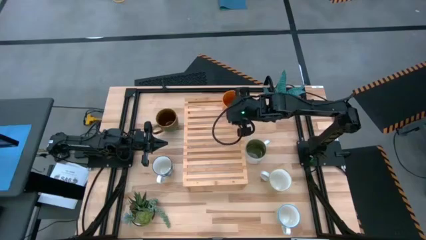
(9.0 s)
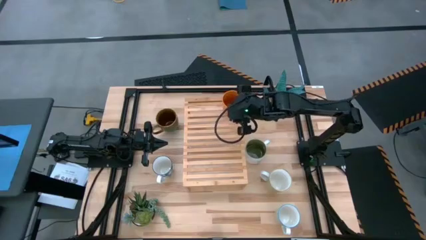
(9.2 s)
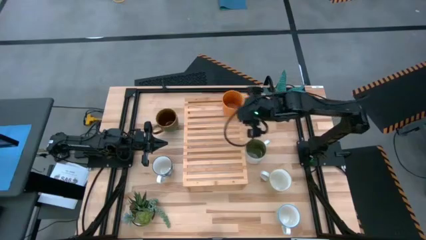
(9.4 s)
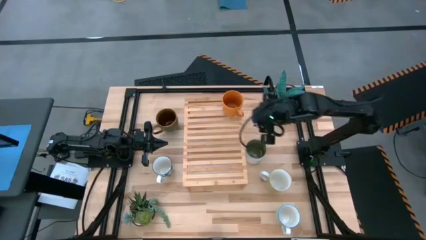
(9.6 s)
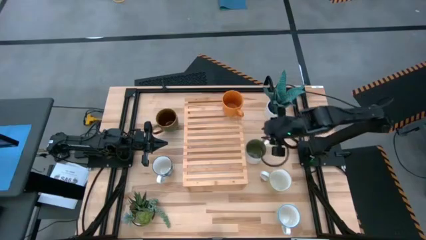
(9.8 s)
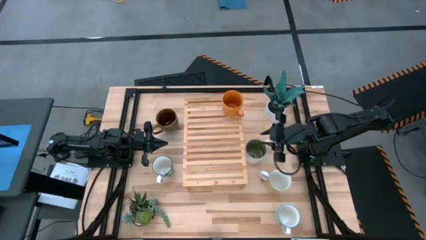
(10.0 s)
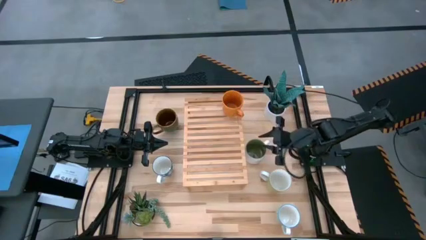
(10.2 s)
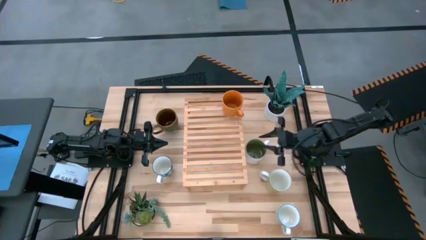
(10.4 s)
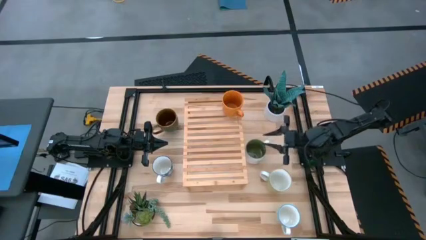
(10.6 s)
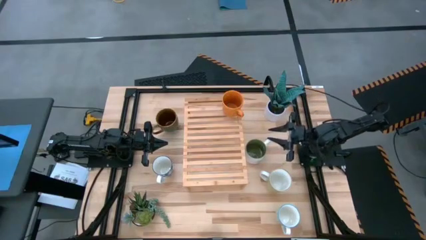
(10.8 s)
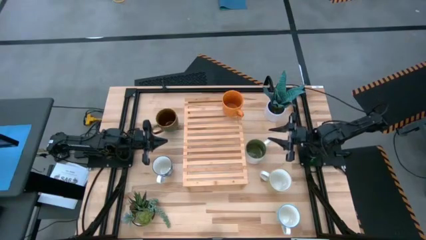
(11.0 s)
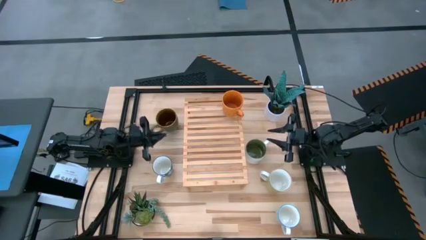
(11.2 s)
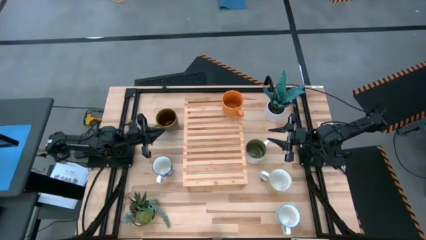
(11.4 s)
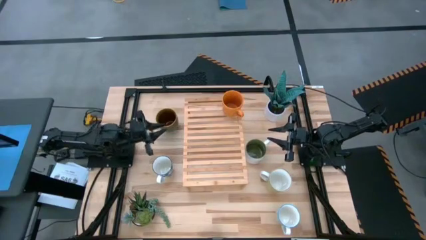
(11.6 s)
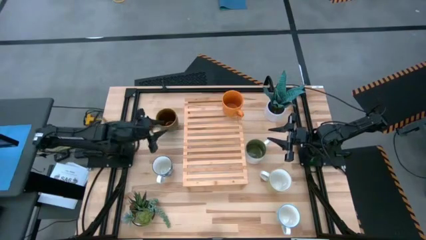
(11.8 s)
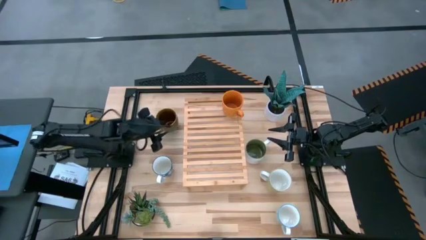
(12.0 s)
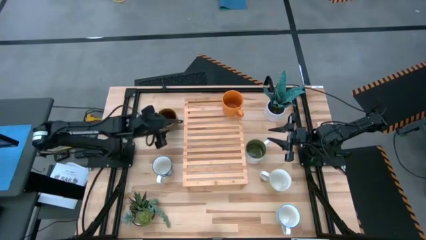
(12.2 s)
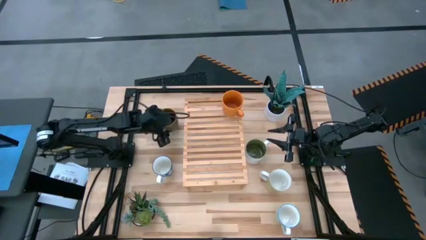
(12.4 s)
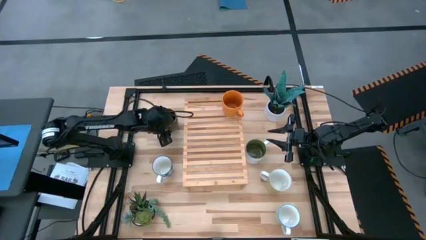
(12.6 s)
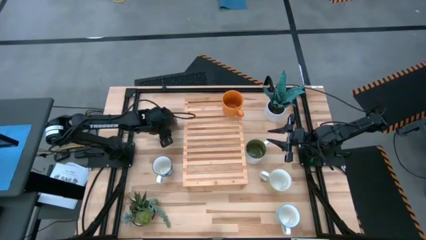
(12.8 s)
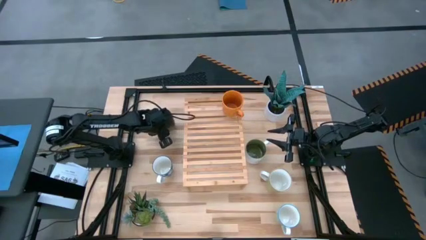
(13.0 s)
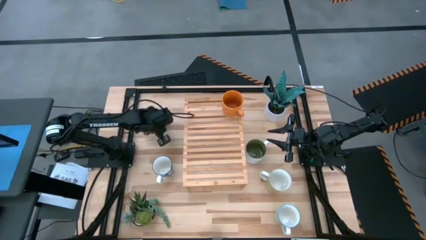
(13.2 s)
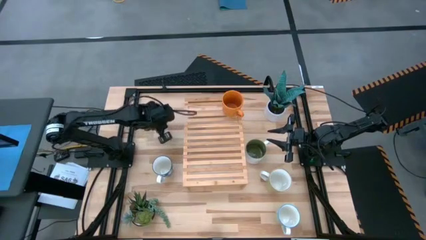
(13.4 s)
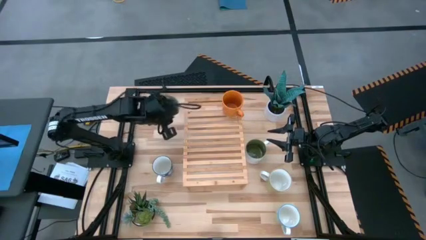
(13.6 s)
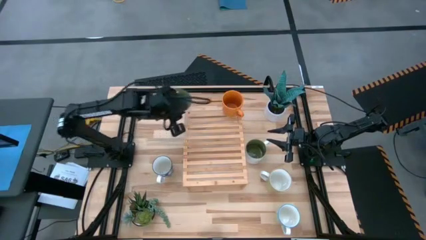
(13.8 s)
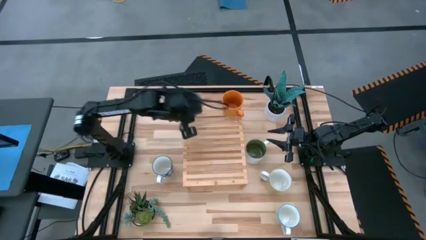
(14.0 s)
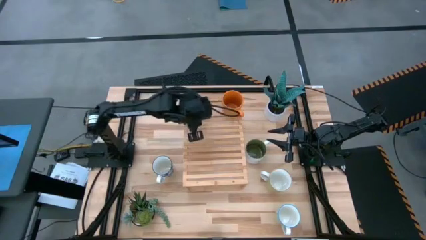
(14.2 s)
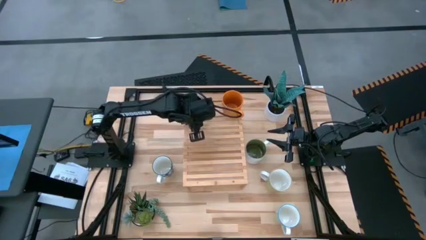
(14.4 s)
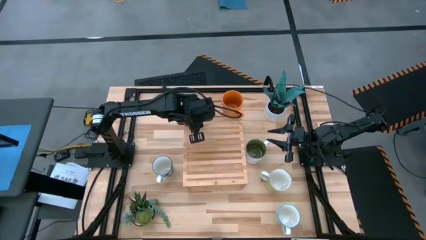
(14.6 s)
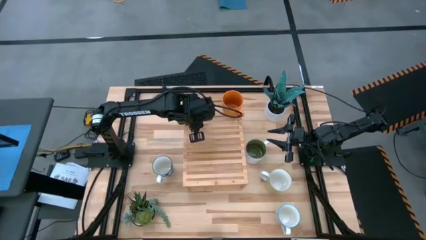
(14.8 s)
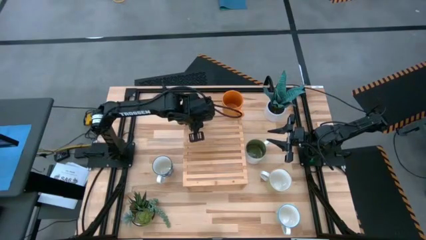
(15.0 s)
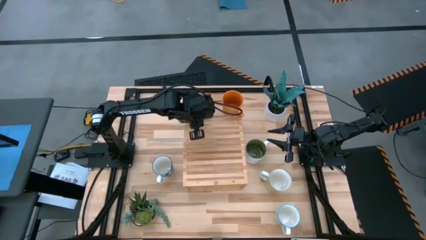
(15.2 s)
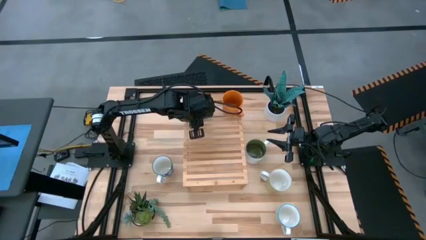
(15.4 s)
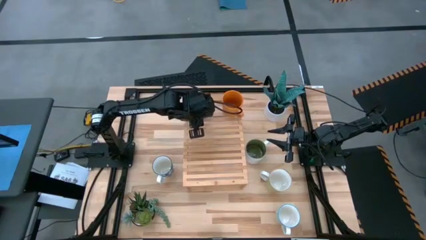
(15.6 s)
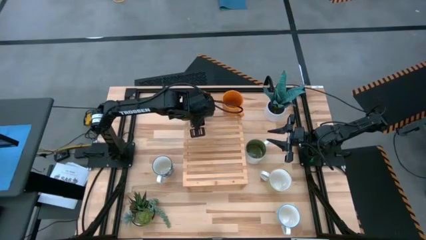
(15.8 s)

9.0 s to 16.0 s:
Task: Place coffee mugs
Put the dark green patterned mug on the shelf

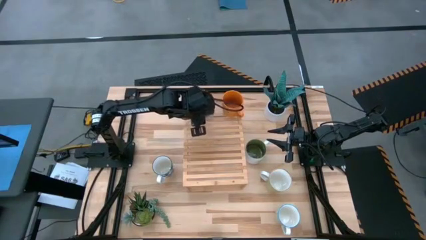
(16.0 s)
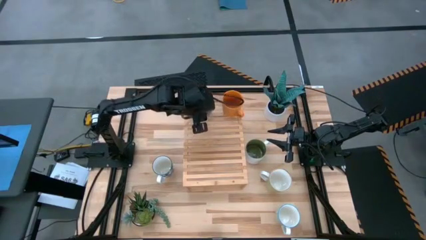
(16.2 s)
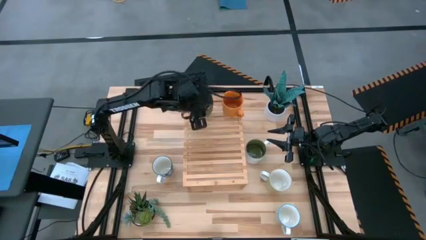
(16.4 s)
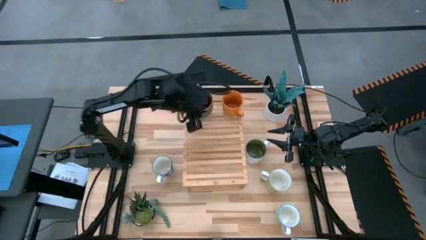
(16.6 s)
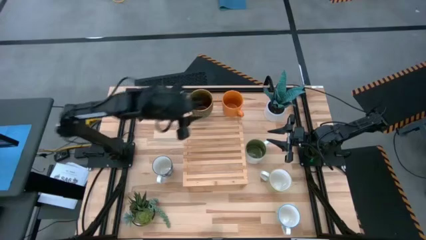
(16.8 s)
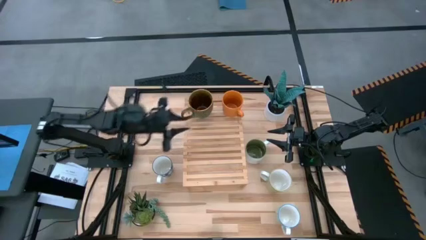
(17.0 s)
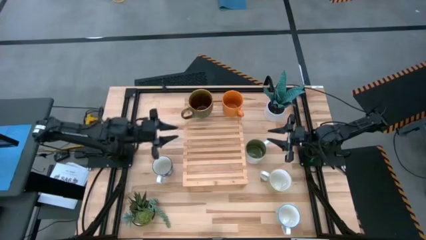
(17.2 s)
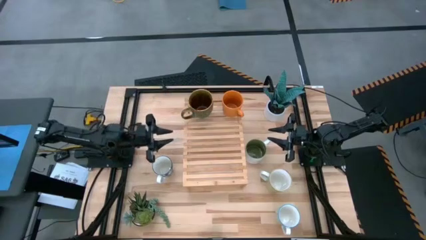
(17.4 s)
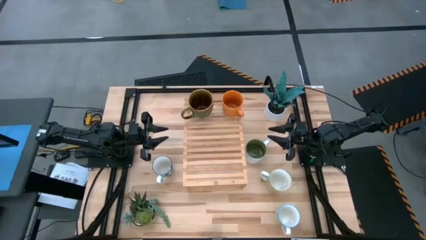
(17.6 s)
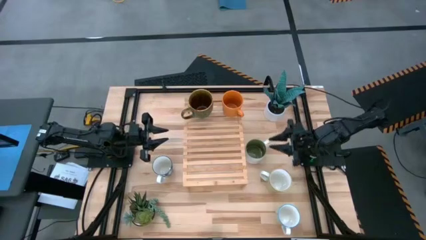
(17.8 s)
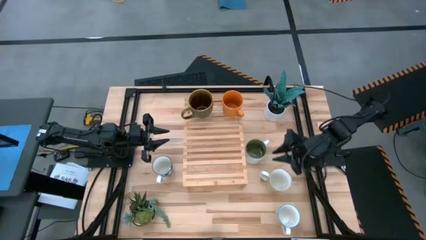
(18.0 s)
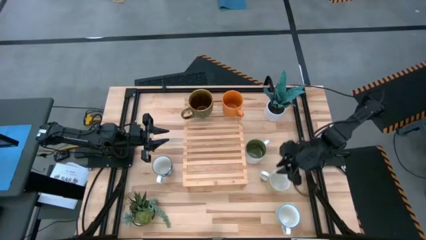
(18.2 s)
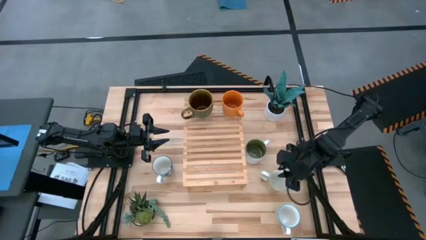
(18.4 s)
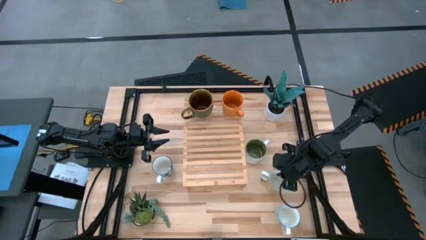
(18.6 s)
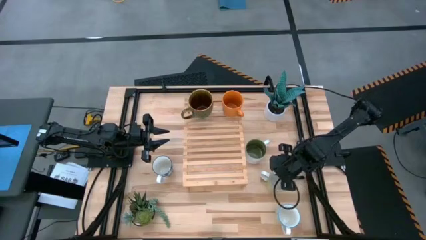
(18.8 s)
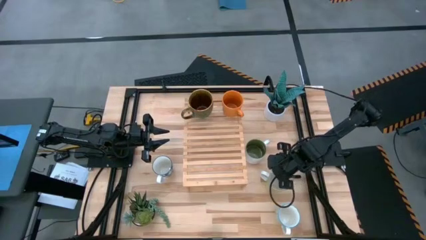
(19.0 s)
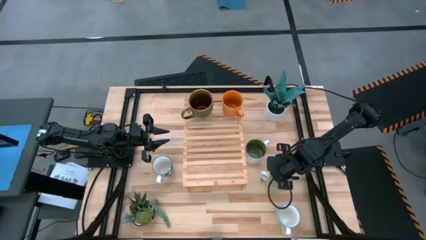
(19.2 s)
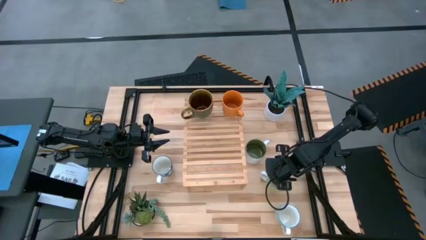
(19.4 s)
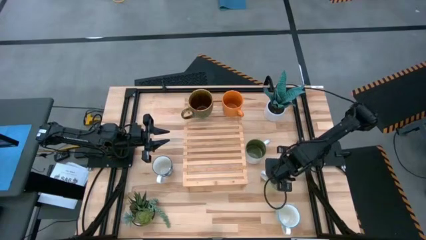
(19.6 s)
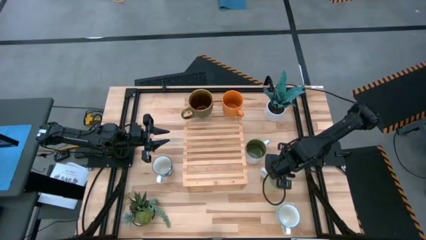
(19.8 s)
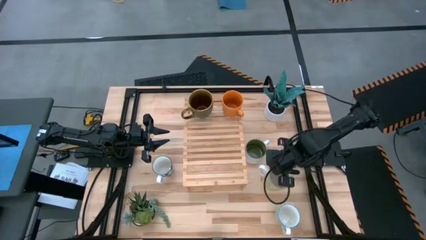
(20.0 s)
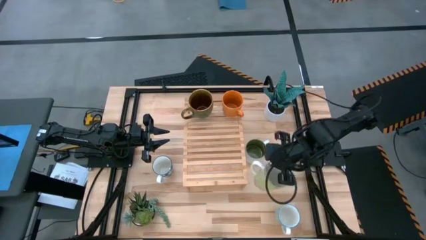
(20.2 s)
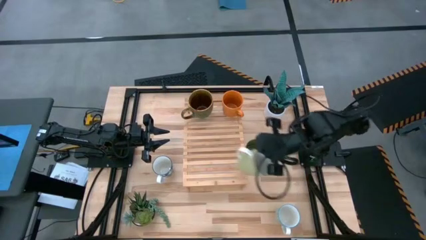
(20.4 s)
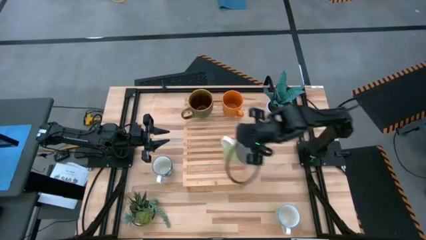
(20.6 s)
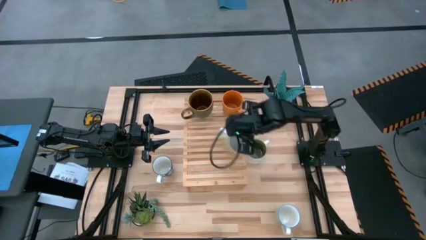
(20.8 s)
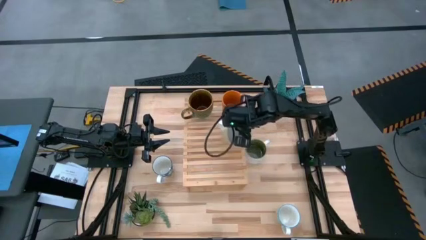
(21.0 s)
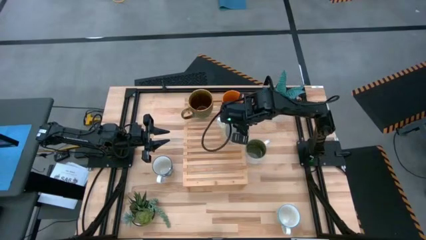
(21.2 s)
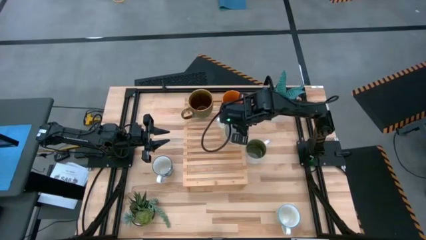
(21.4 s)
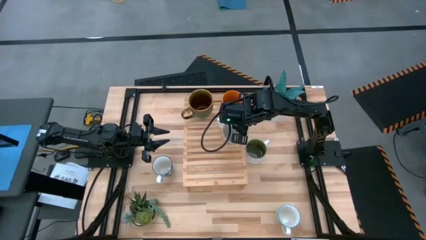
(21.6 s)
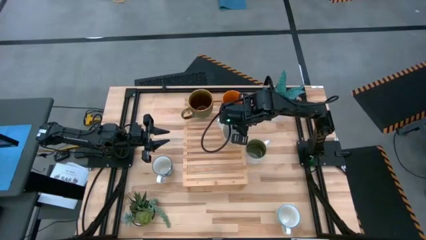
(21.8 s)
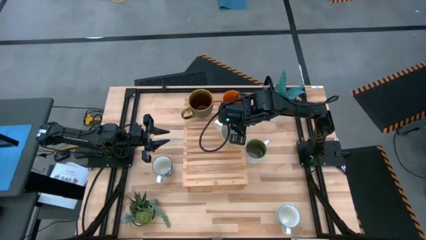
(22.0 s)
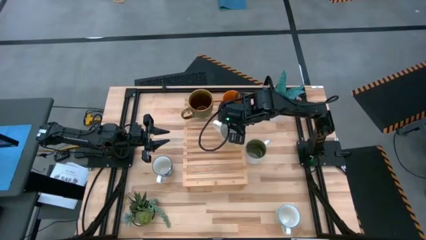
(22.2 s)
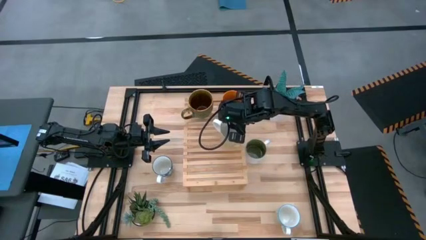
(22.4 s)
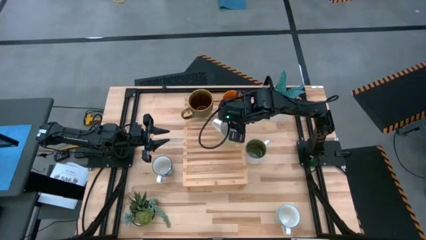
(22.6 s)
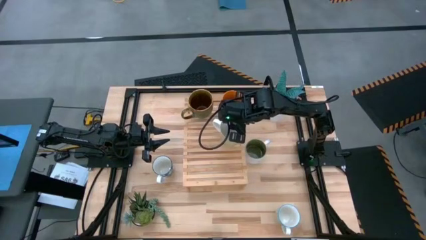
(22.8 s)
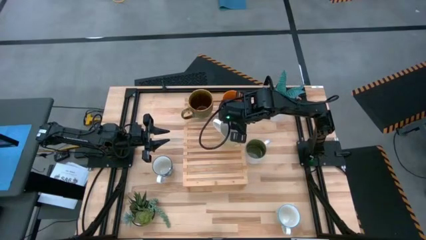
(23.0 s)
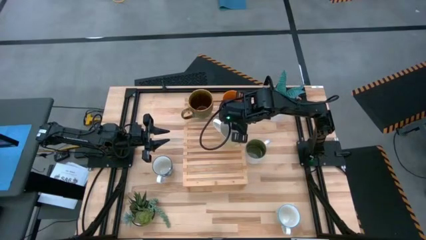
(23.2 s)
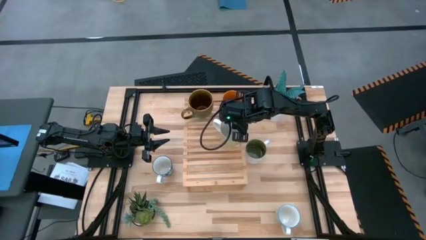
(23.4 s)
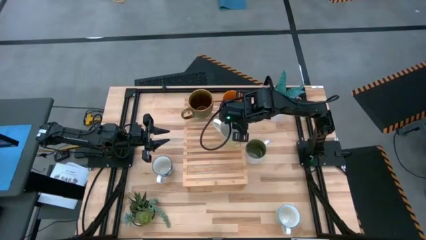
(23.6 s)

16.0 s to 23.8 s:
Put the light green mug on the shelf
